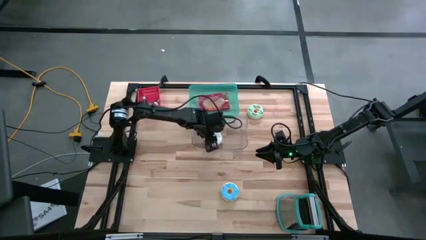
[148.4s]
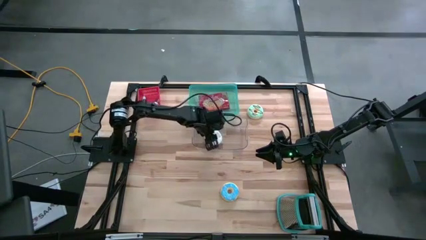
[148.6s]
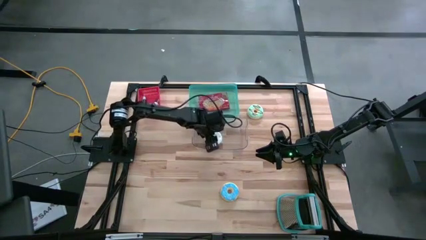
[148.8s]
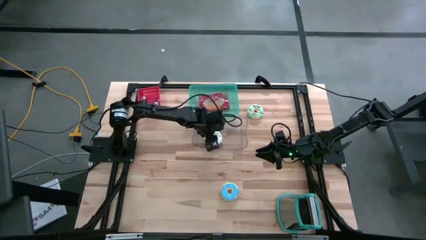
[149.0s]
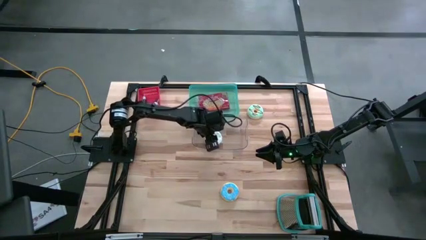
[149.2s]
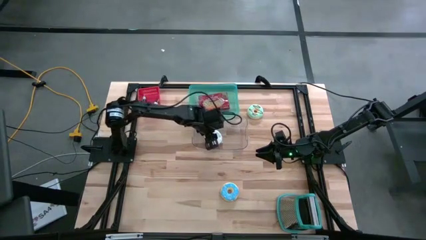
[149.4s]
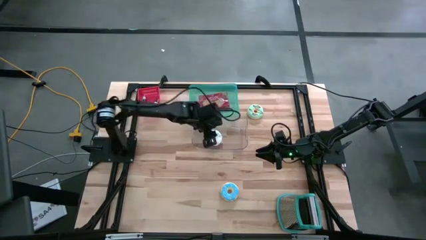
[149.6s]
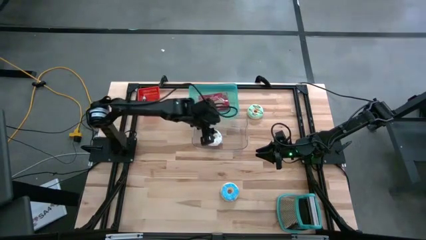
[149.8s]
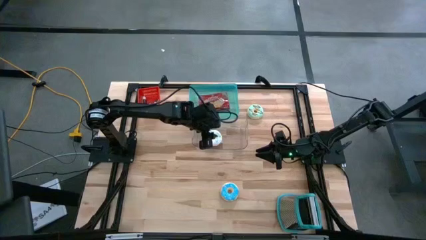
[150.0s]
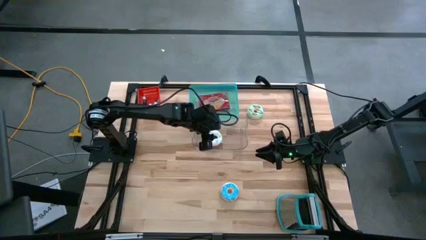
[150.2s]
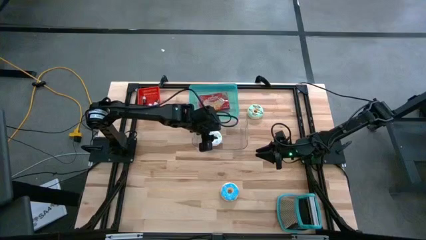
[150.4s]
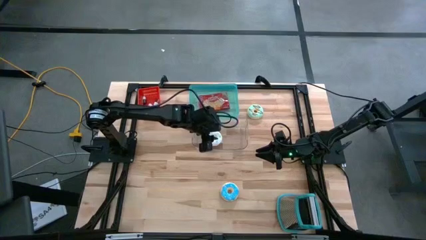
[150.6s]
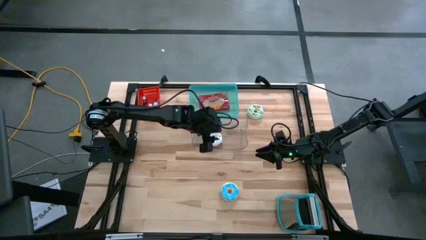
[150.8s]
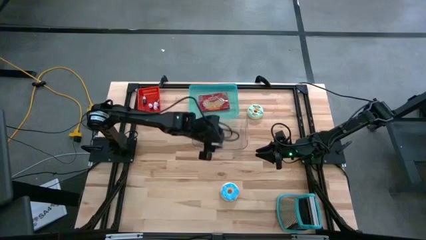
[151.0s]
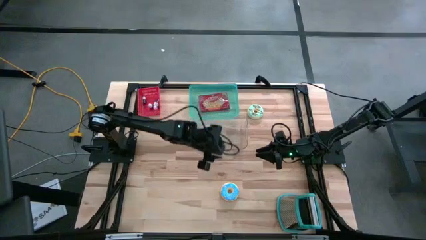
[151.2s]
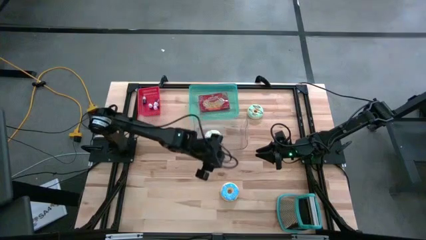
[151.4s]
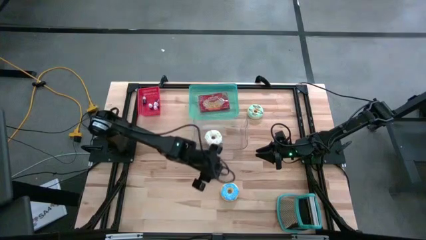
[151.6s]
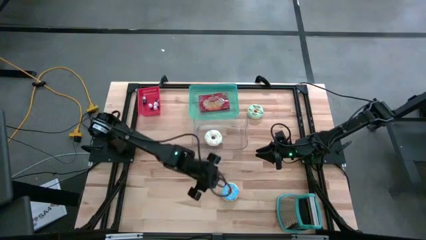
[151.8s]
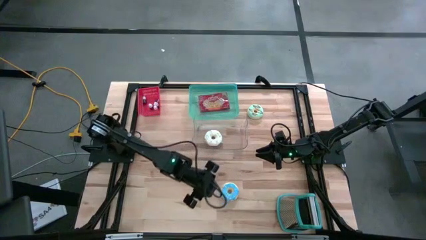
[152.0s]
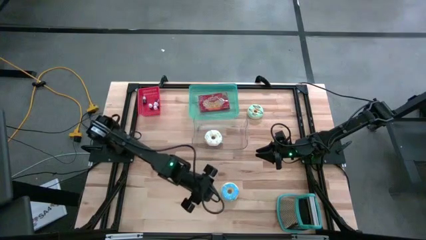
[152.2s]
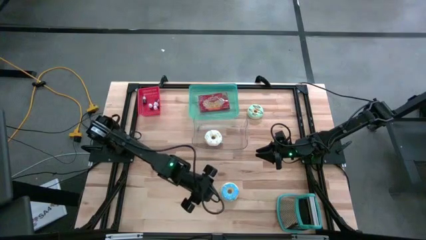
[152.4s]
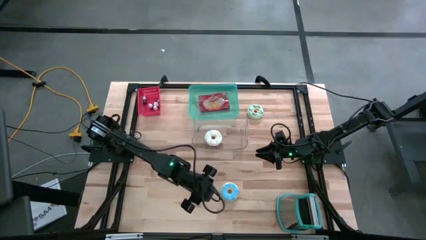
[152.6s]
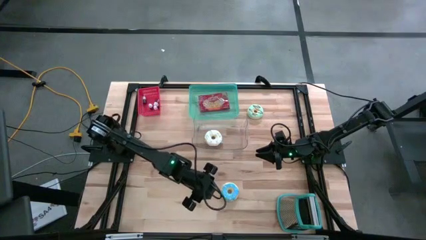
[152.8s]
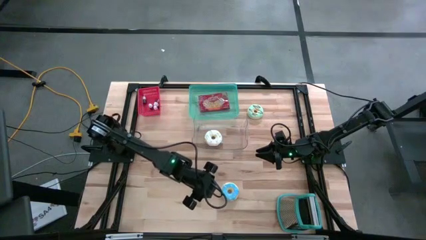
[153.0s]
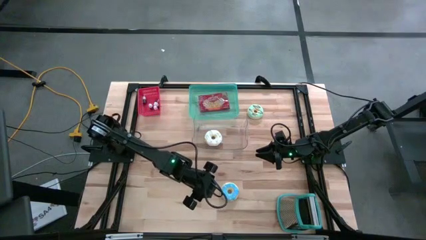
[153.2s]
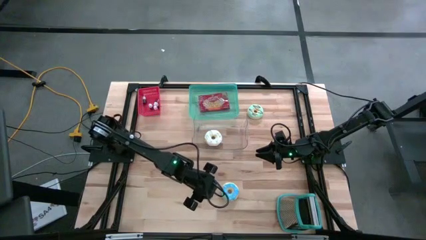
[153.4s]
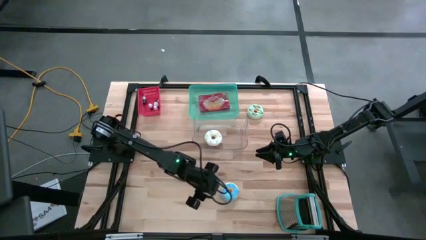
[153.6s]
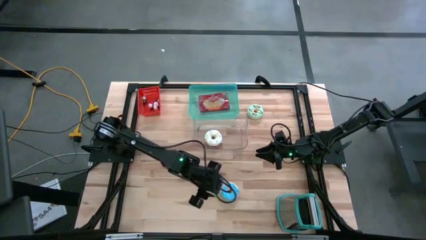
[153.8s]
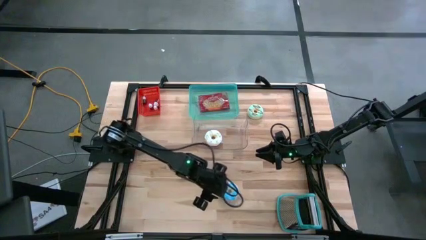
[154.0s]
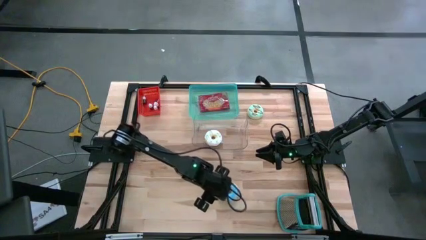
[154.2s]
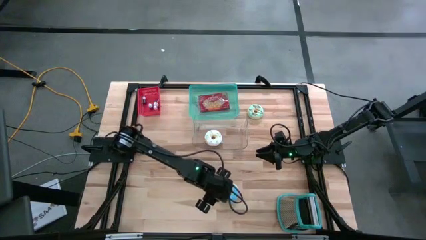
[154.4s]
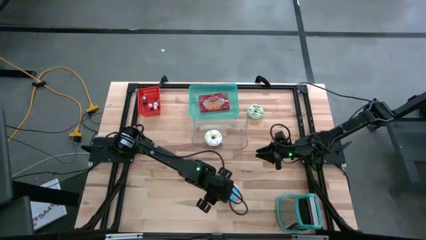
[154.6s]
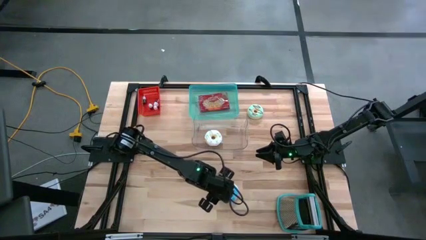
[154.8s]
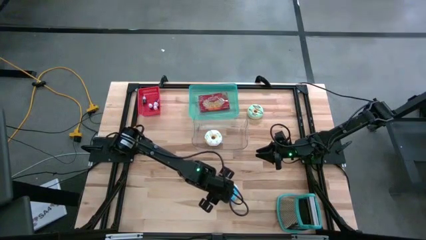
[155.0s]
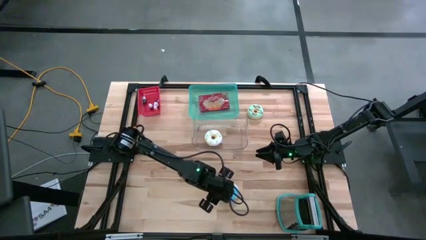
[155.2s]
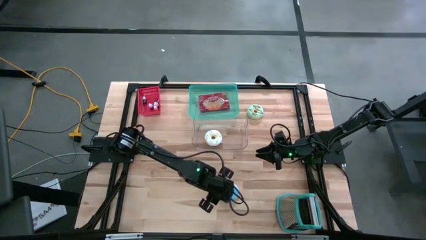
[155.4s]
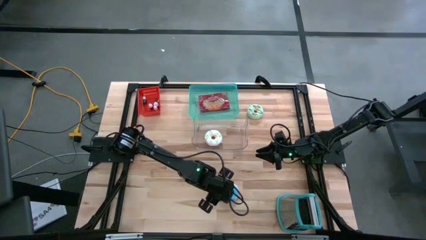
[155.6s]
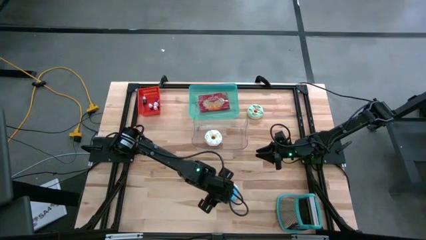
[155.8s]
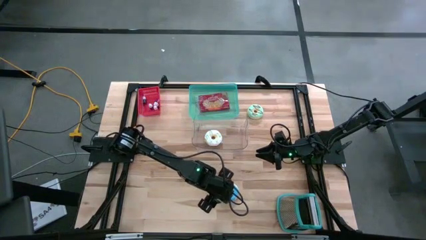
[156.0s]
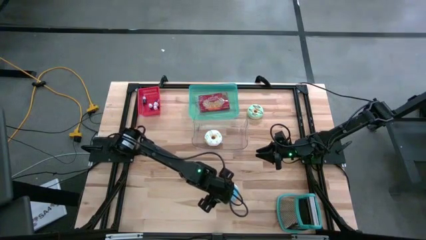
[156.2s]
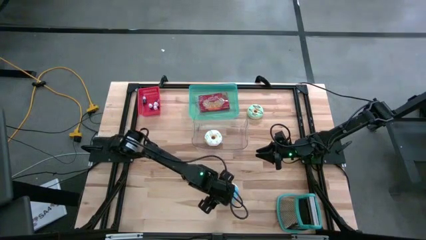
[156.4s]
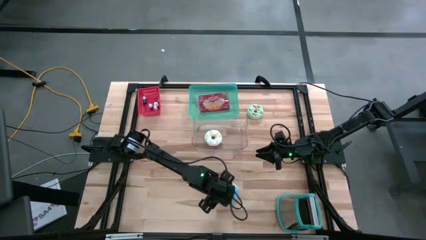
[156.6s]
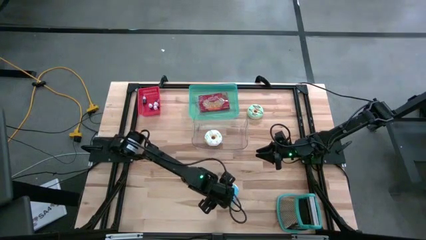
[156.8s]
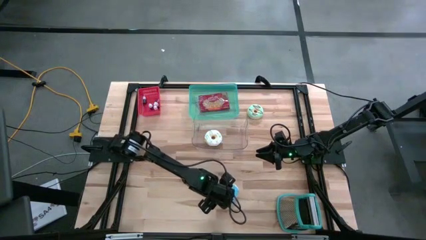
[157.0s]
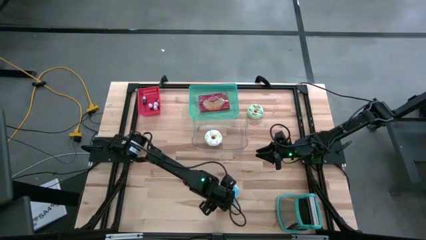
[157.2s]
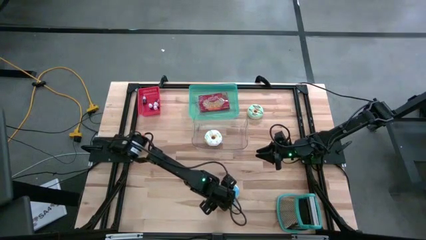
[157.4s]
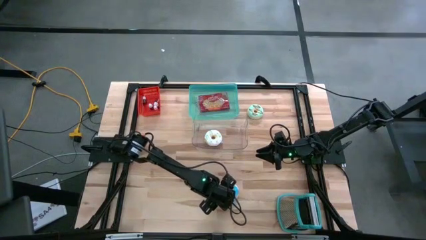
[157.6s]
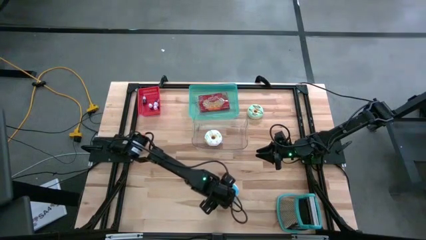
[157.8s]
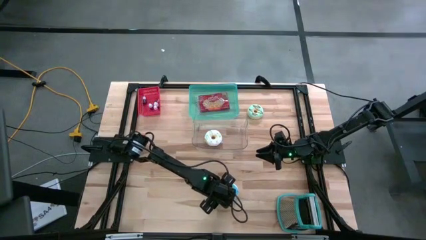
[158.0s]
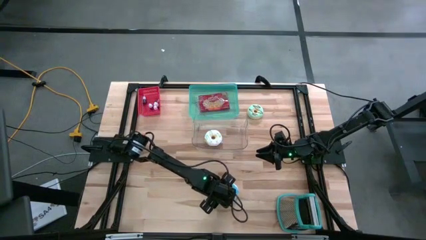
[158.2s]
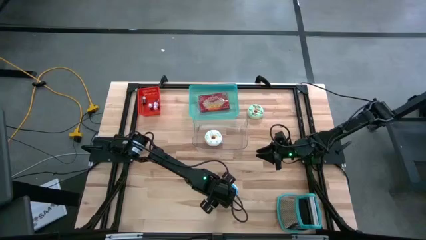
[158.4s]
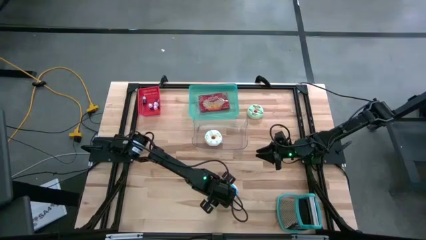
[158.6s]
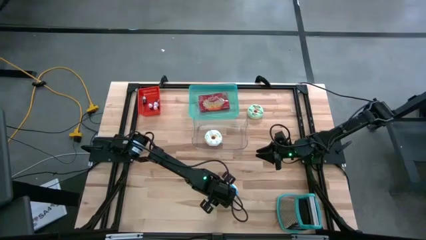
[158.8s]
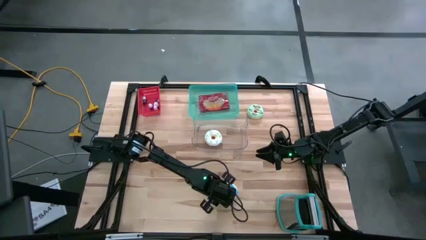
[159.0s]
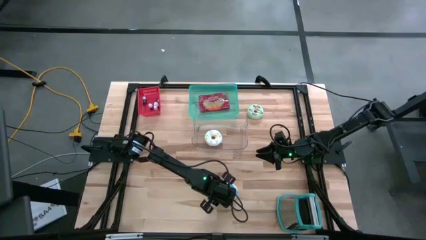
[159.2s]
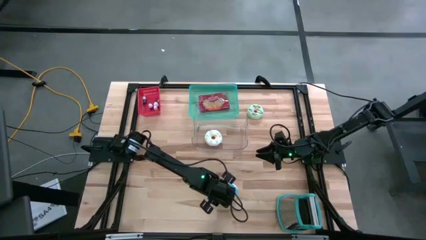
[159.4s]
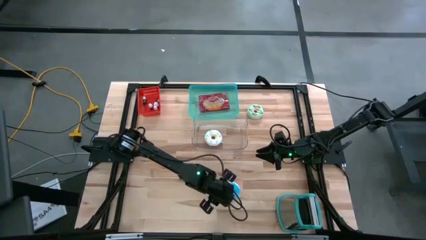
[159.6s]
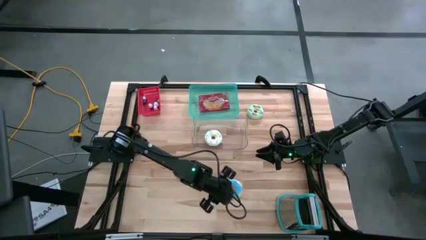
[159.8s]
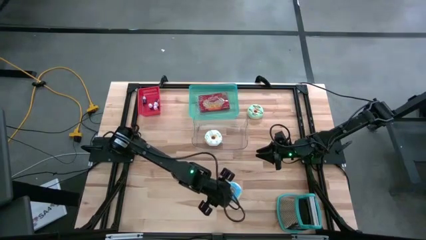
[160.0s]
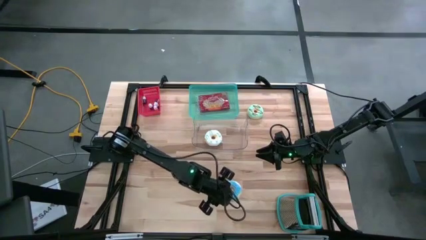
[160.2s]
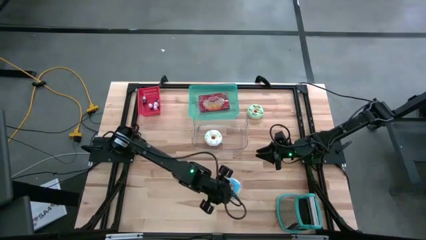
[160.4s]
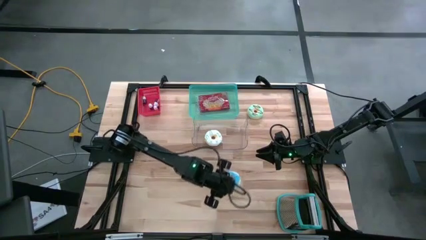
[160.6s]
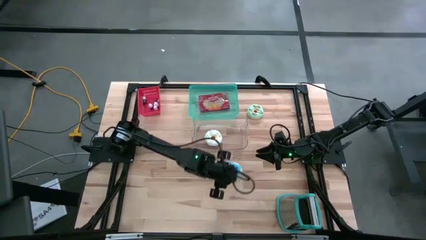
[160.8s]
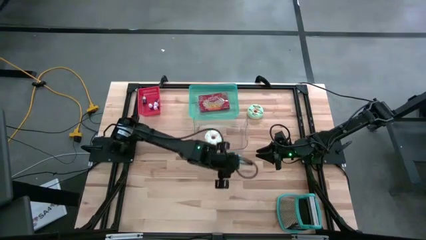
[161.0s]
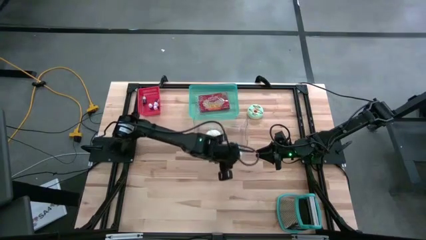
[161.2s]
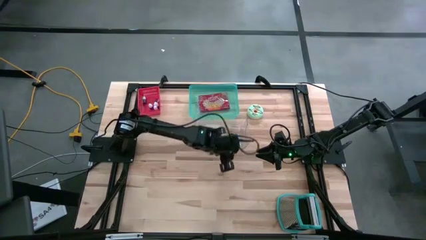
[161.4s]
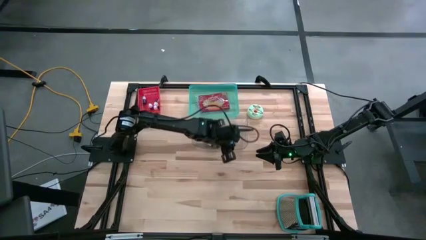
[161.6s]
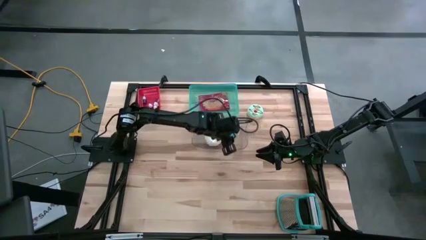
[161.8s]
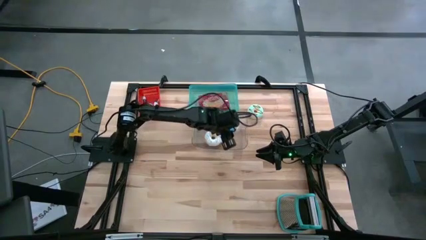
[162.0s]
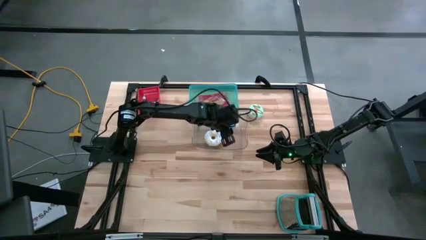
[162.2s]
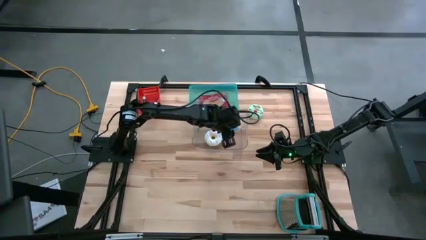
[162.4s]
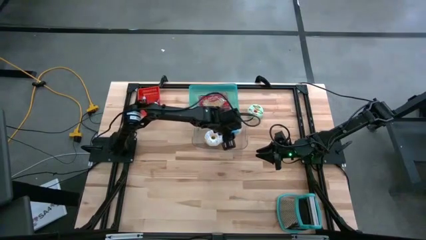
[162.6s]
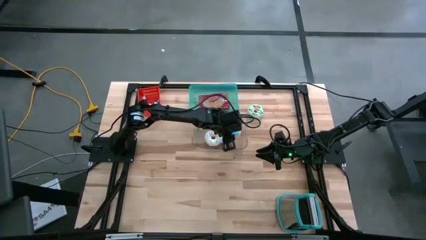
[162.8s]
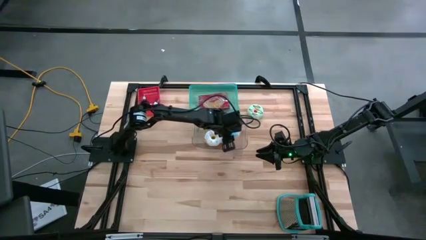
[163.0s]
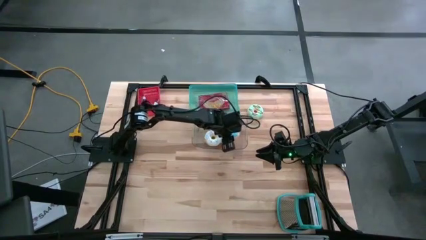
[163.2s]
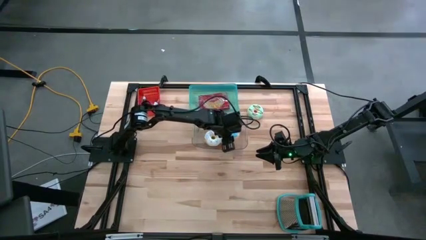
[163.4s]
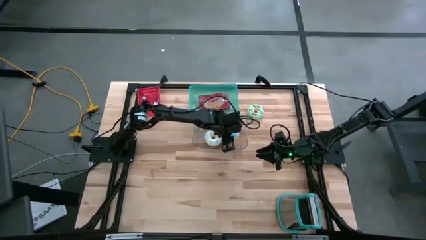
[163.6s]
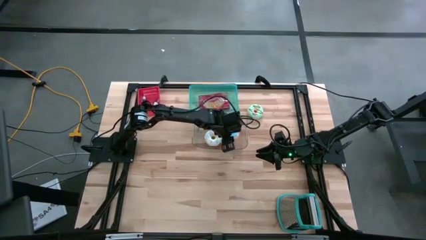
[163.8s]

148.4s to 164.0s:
Put the blue donut into the transparent bin
